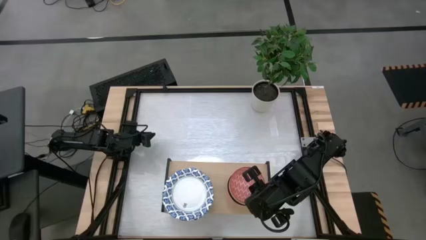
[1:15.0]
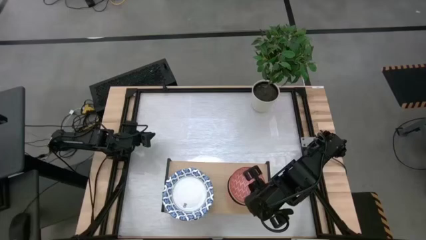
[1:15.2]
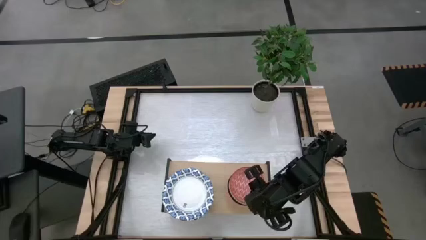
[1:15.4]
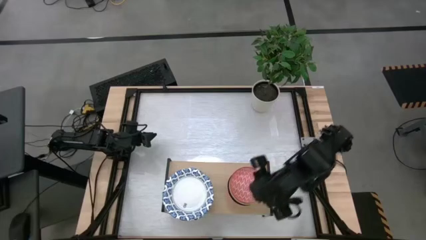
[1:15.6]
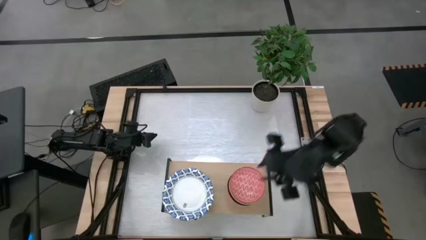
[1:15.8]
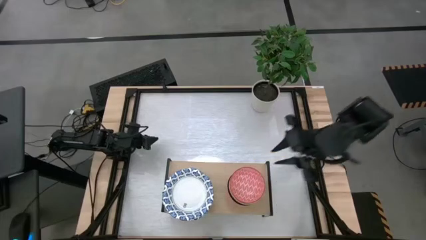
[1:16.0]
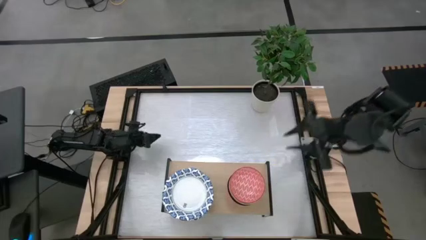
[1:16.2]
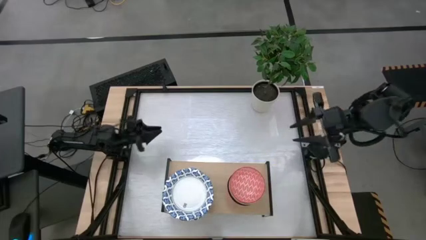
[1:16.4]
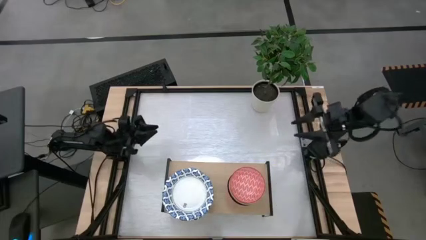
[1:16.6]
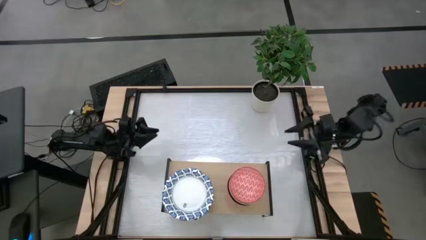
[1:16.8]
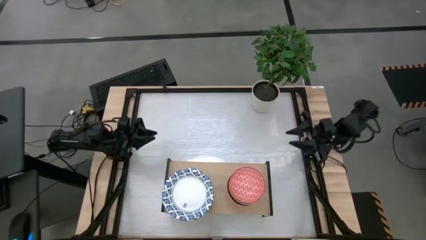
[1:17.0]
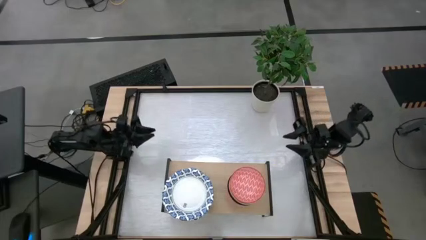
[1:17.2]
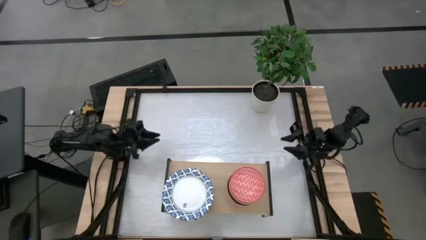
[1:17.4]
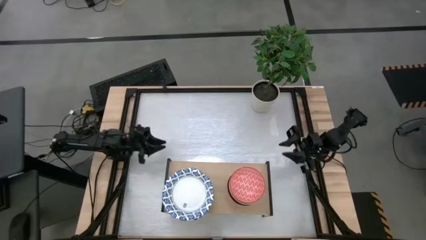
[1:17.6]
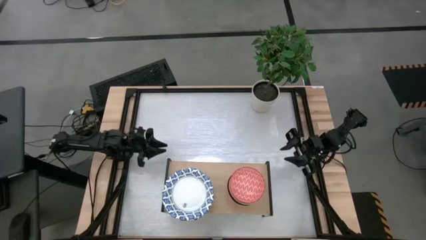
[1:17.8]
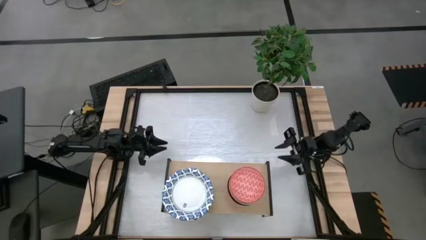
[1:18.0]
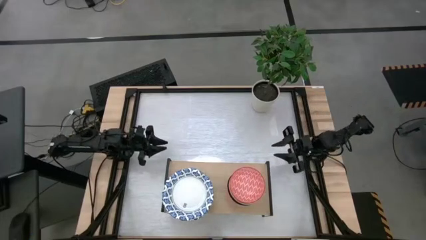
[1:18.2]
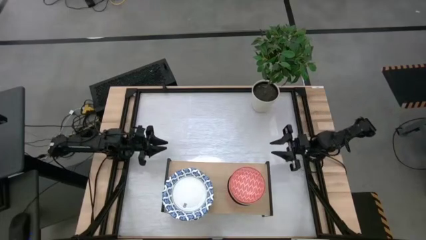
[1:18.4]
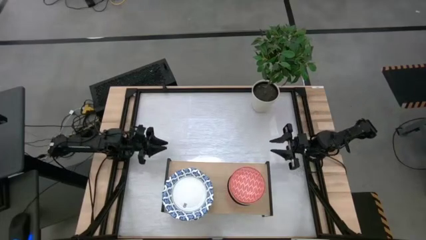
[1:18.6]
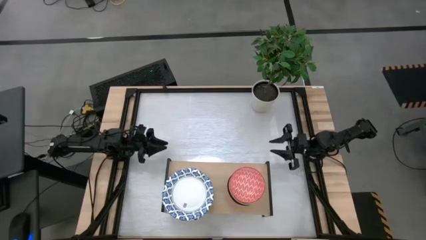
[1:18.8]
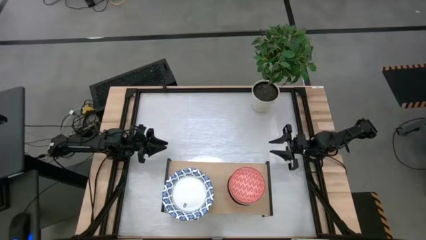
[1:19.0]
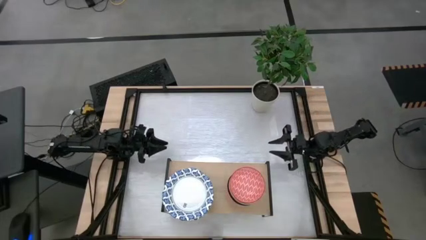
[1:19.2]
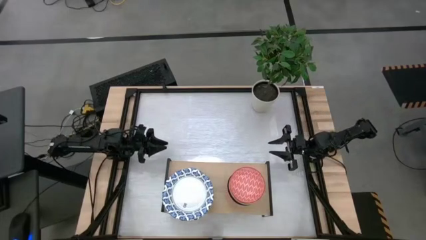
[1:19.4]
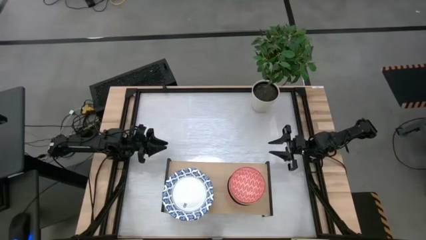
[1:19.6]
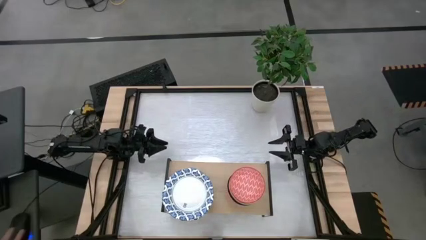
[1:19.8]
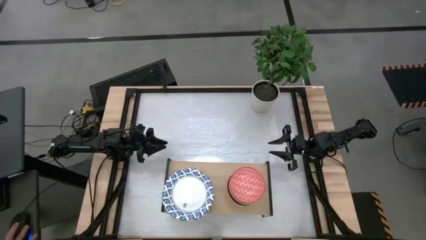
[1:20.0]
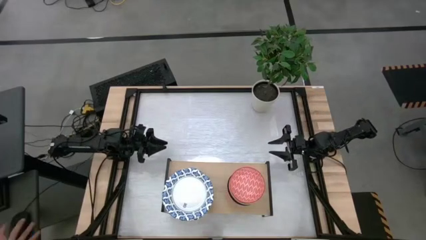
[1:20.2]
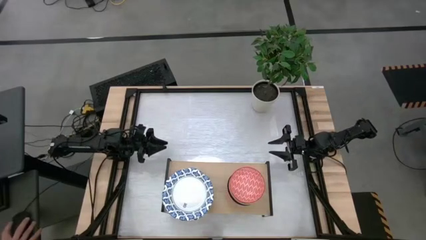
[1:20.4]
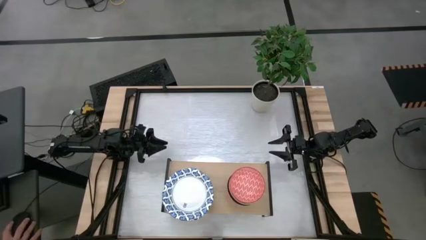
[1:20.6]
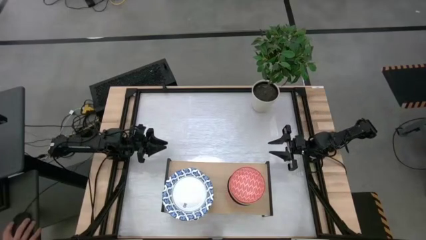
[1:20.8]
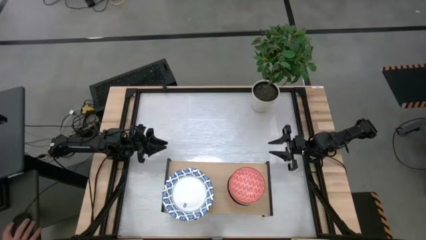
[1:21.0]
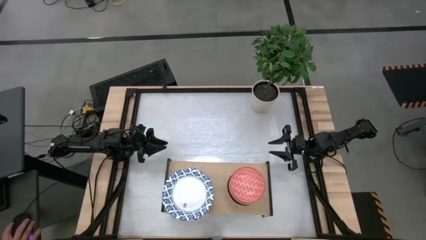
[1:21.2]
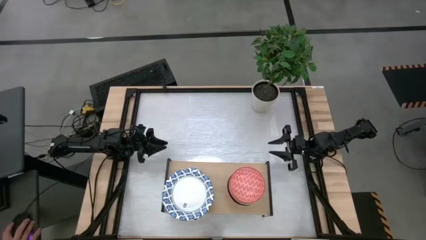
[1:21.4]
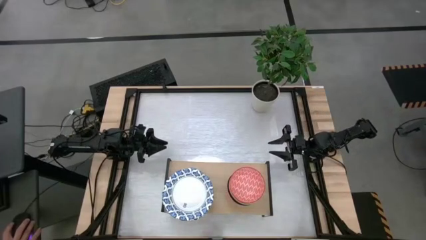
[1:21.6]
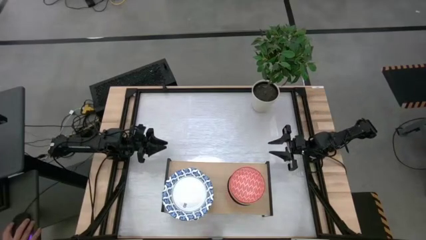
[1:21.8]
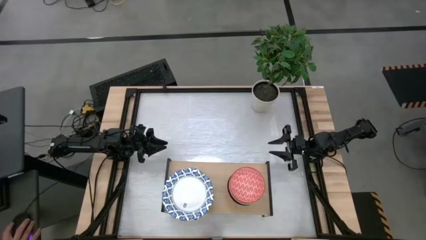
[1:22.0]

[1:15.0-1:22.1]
Task: Place and stack bowls onto a shelf
Return to Home Position

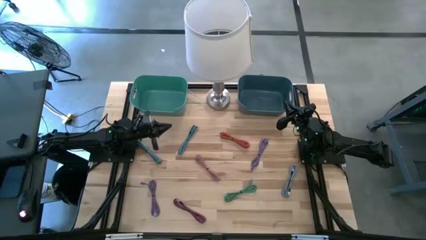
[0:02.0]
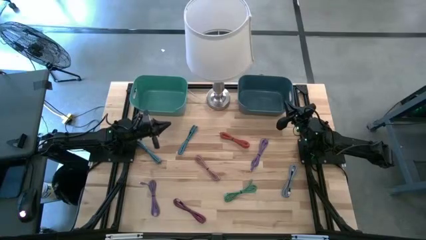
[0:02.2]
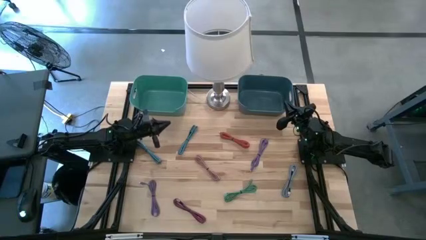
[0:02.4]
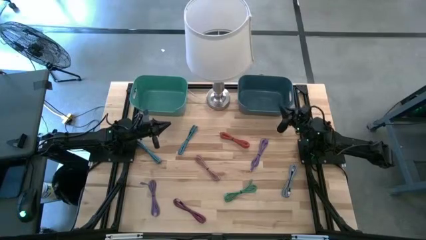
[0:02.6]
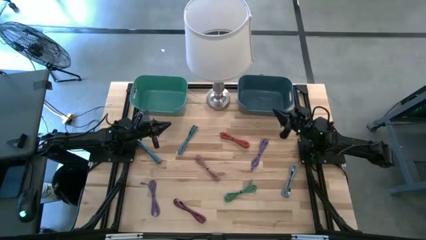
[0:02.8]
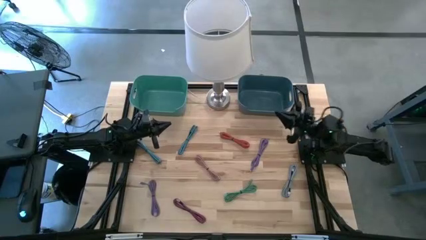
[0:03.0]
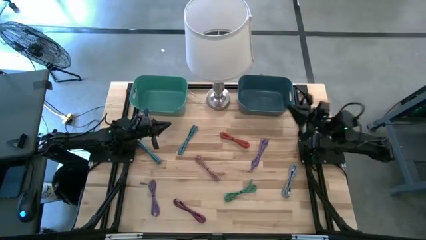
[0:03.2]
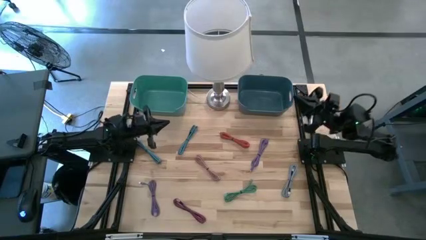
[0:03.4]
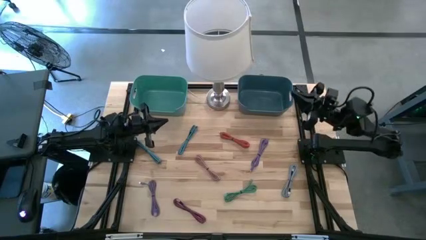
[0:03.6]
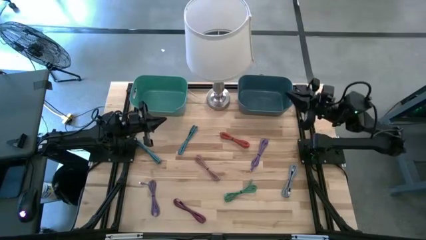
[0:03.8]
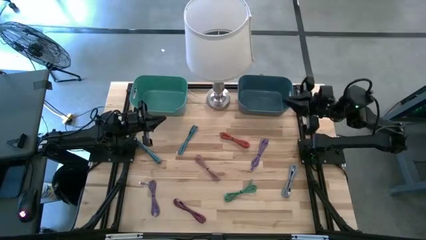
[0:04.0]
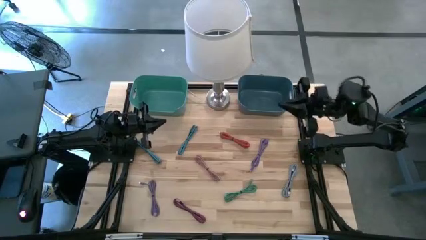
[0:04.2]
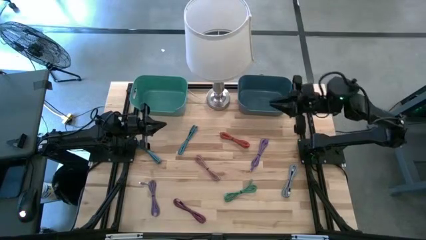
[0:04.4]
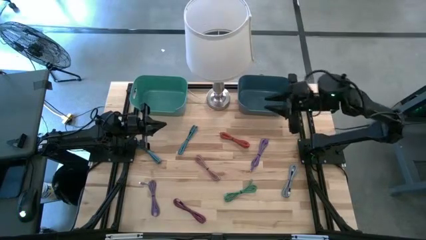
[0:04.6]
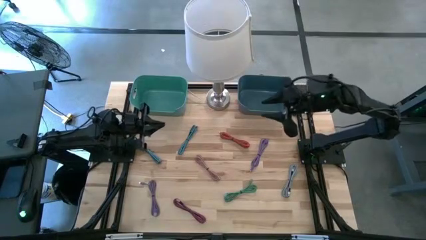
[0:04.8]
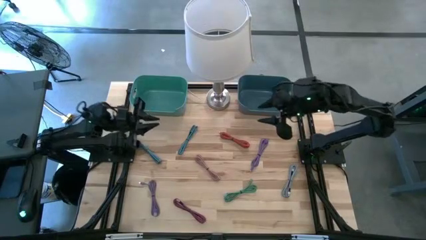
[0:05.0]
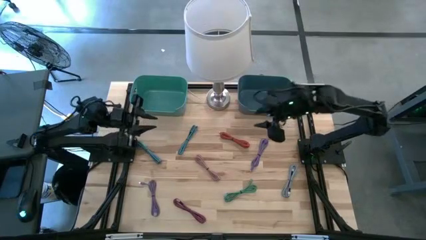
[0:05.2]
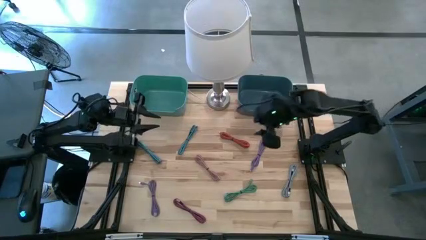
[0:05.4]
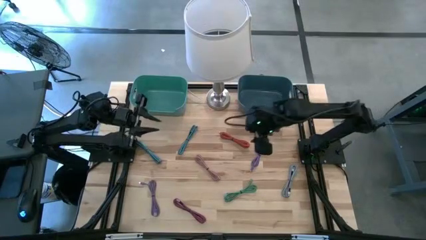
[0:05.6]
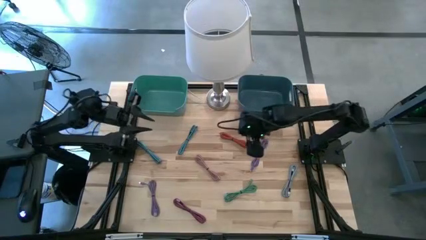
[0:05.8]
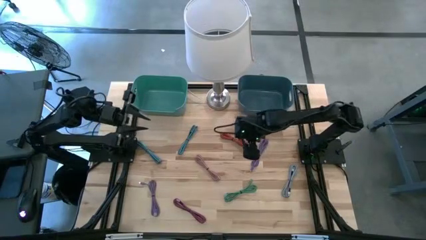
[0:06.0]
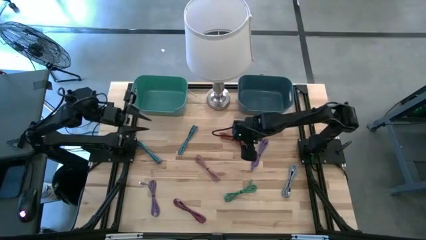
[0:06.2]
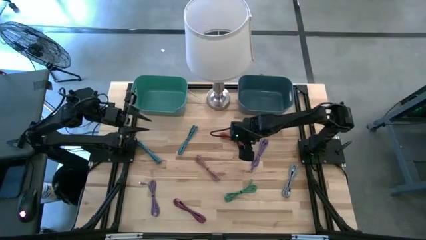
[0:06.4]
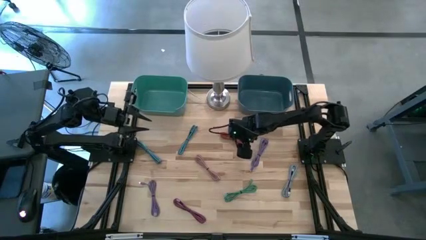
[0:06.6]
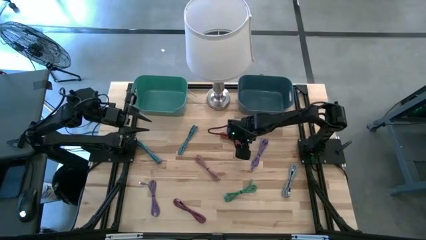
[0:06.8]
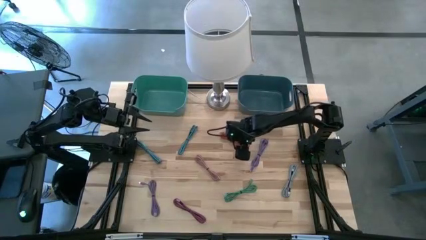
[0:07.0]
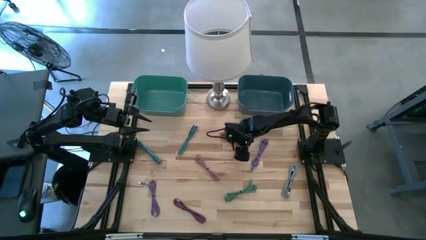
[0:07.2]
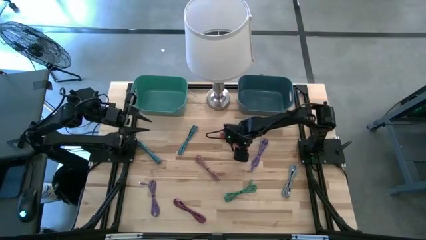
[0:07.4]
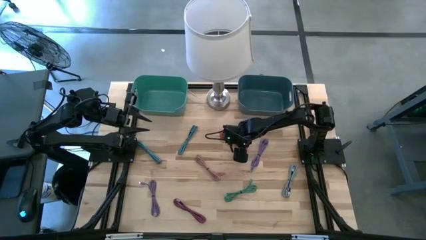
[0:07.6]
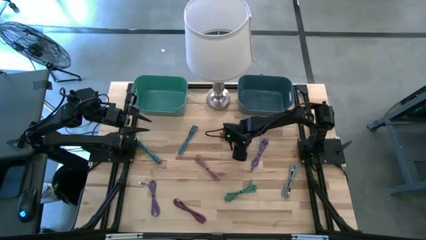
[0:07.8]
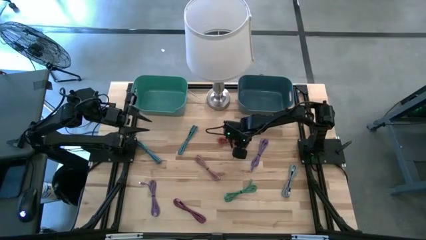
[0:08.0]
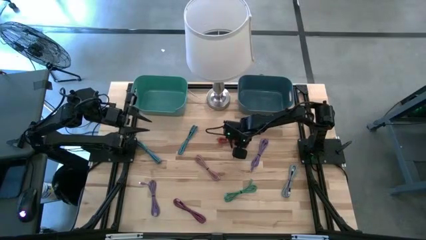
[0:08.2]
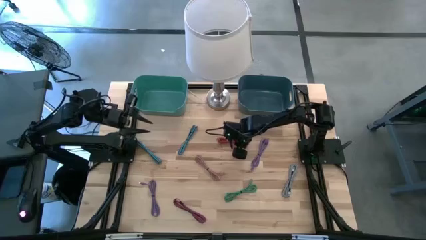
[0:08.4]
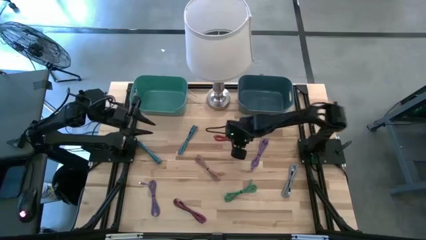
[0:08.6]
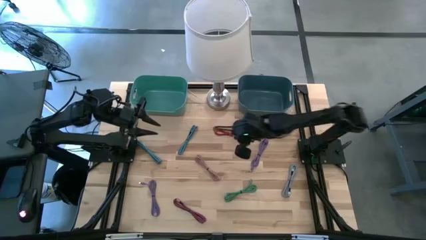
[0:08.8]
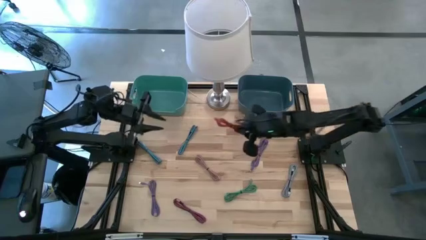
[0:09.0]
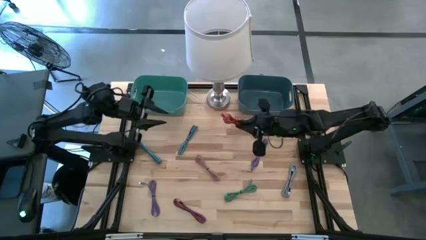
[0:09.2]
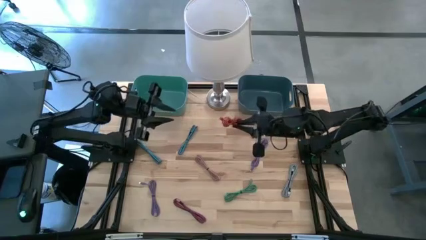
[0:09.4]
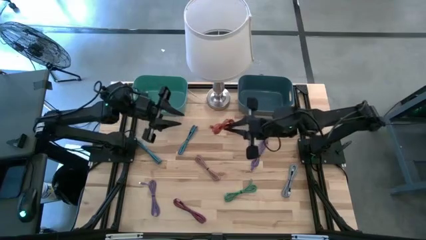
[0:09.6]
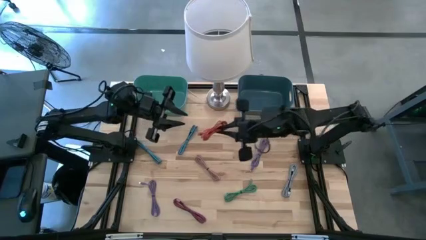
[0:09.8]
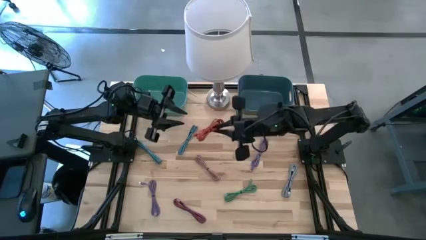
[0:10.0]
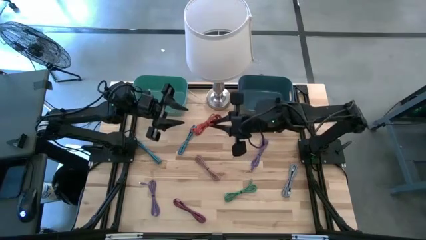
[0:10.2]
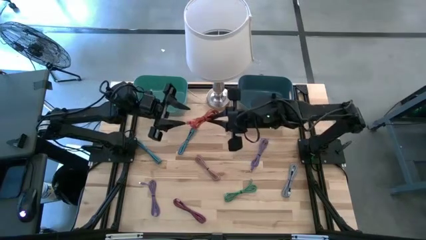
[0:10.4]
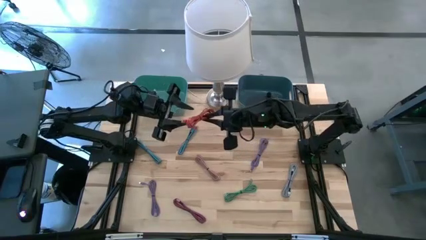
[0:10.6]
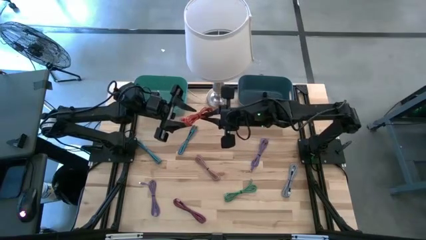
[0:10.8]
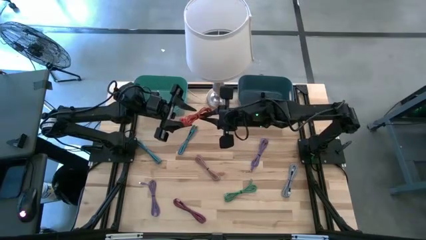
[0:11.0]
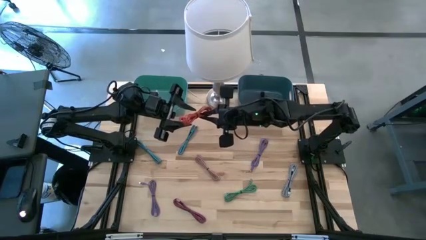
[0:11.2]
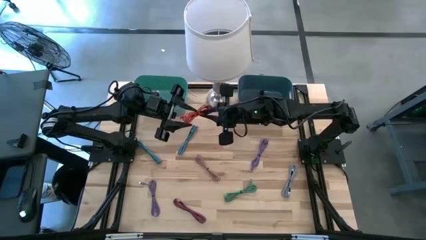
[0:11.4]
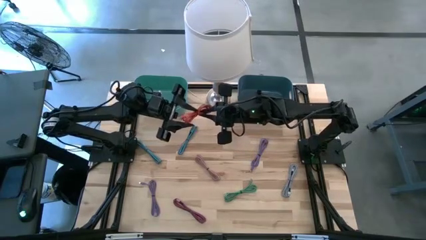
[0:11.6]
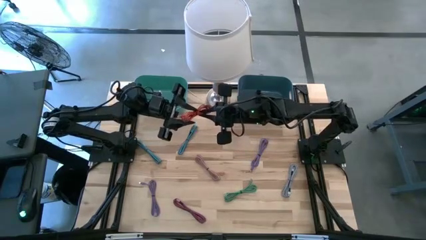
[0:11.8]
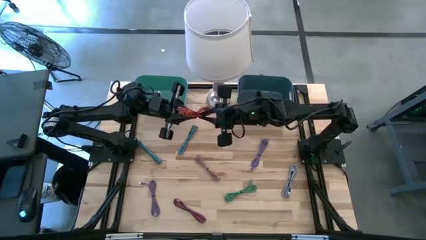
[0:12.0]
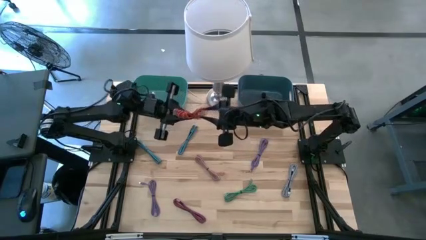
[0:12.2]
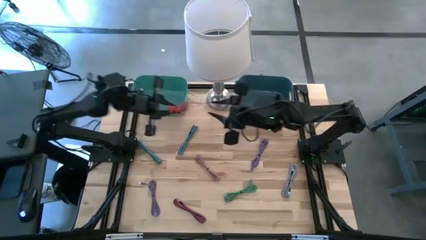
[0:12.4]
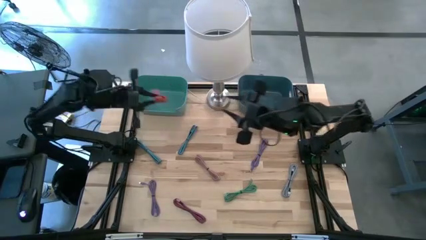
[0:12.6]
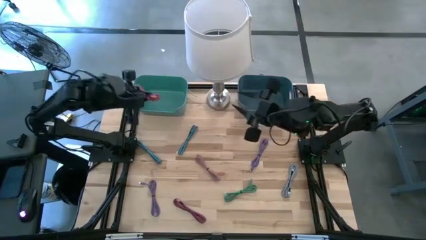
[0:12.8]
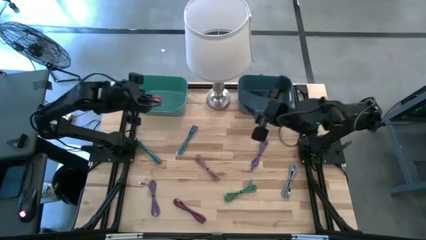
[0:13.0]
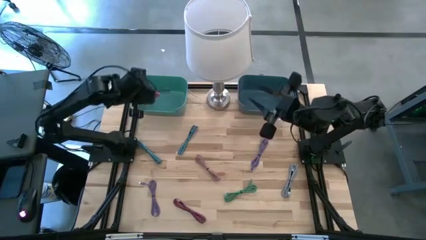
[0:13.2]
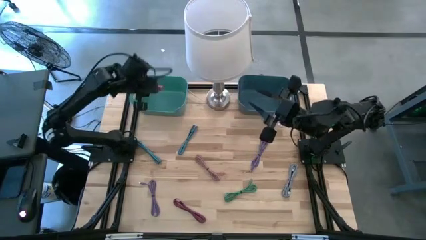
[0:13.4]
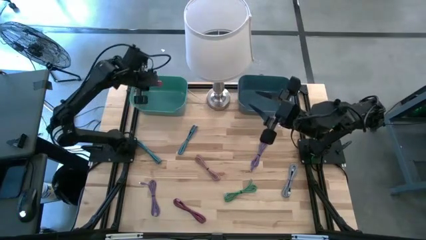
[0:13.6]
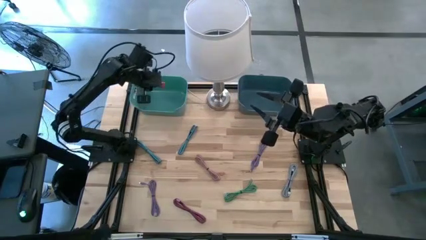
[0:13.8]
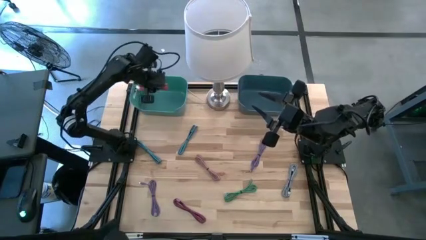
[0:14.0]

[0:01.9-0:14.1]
Task: Pick & Place USB Port
Put the orange charger cable into the green bin
